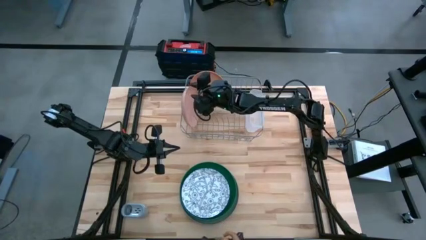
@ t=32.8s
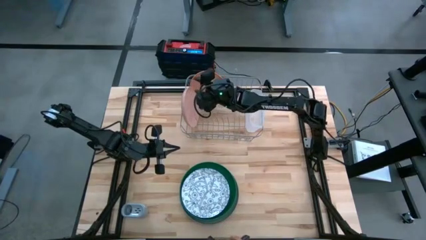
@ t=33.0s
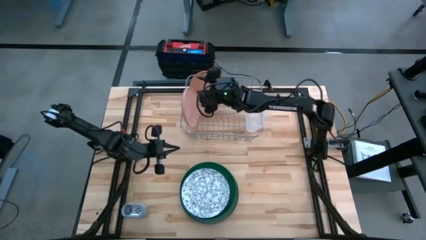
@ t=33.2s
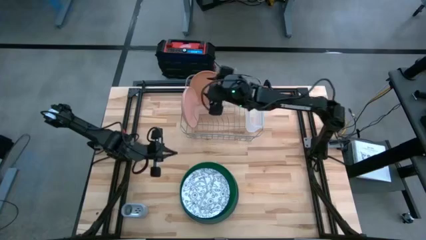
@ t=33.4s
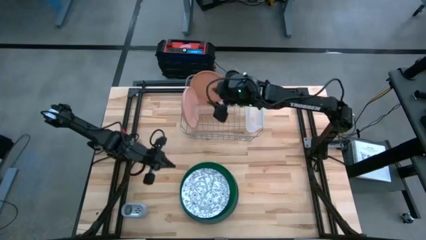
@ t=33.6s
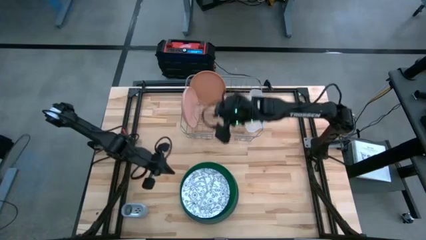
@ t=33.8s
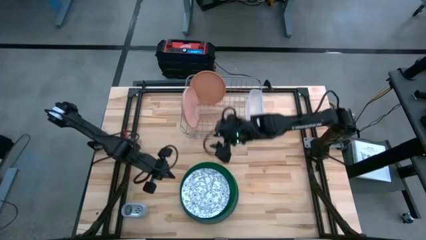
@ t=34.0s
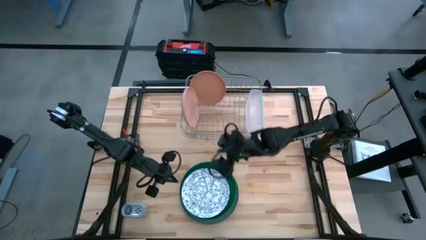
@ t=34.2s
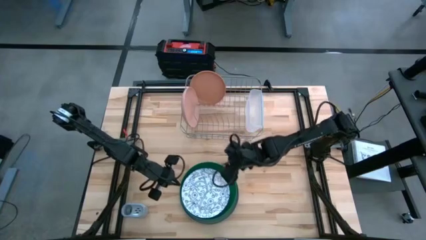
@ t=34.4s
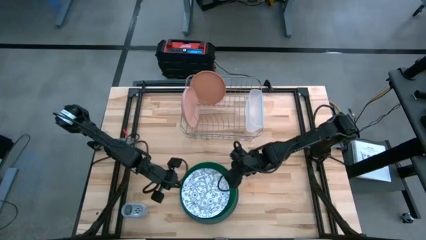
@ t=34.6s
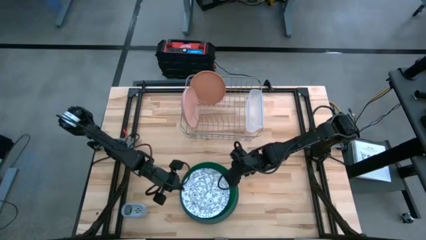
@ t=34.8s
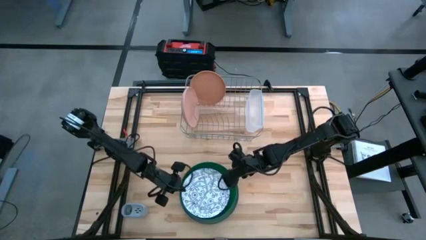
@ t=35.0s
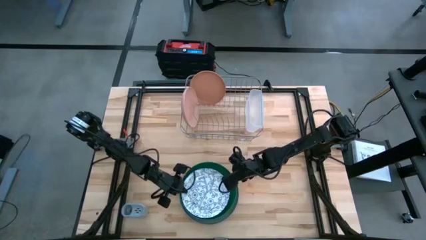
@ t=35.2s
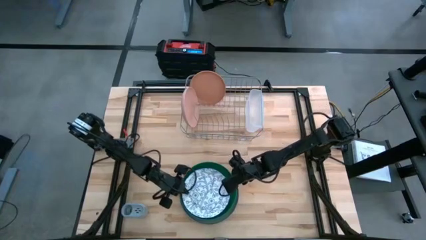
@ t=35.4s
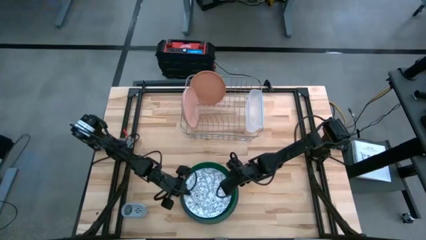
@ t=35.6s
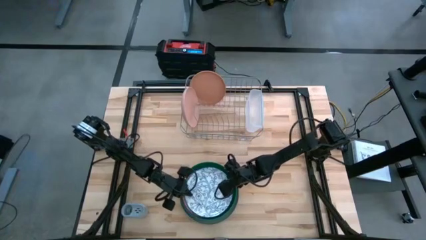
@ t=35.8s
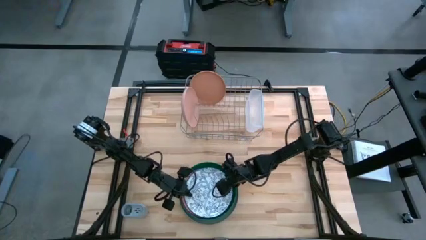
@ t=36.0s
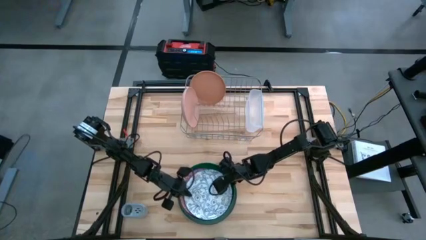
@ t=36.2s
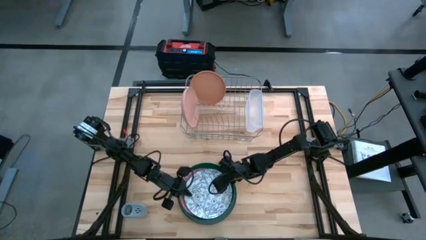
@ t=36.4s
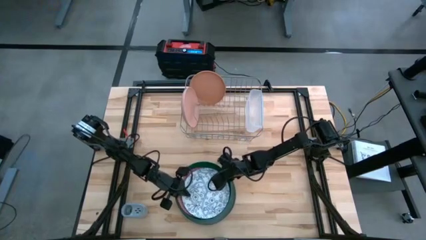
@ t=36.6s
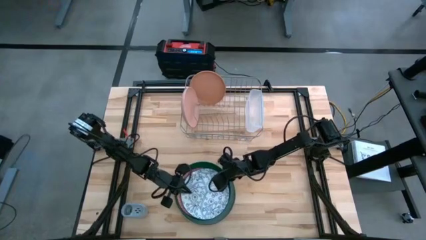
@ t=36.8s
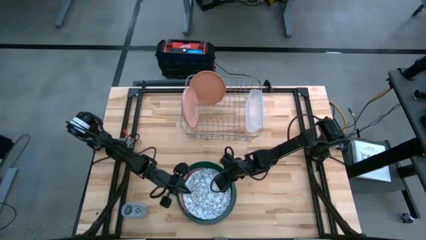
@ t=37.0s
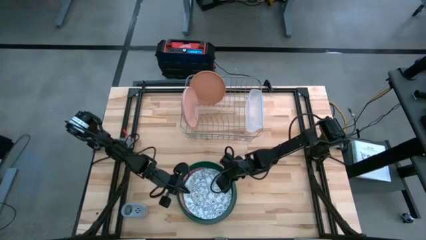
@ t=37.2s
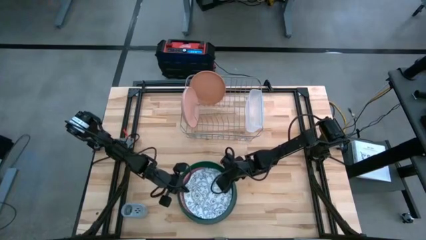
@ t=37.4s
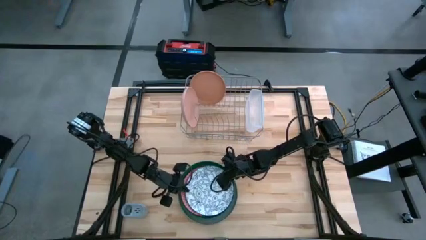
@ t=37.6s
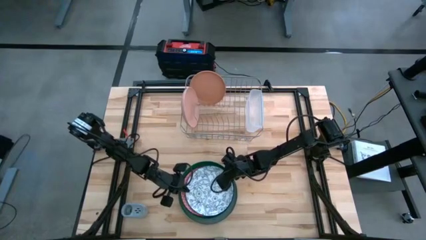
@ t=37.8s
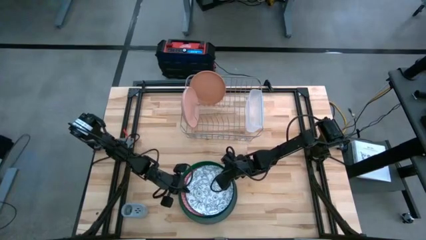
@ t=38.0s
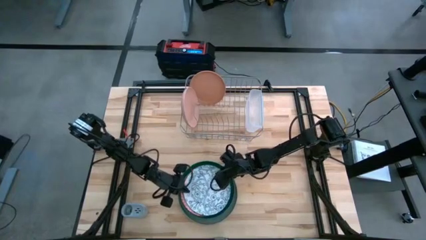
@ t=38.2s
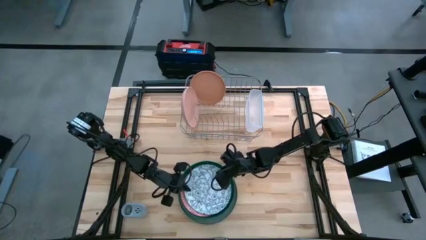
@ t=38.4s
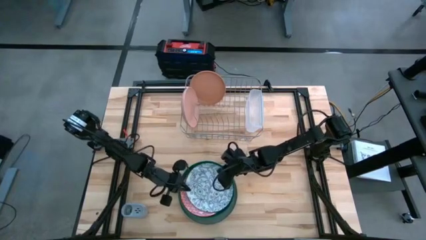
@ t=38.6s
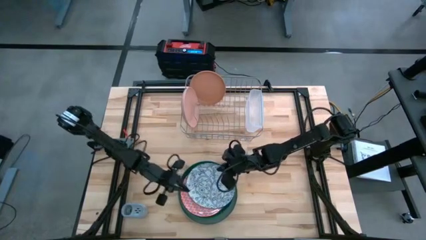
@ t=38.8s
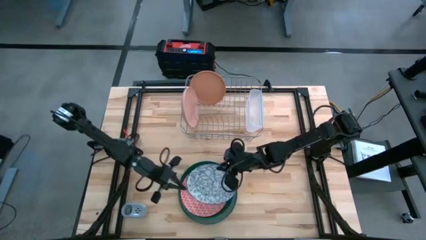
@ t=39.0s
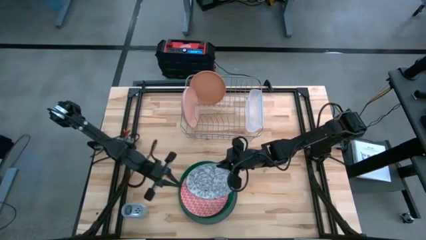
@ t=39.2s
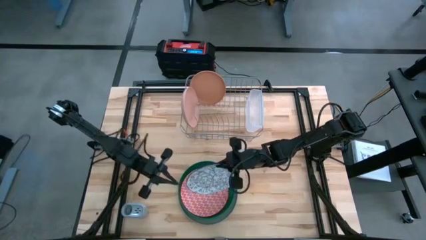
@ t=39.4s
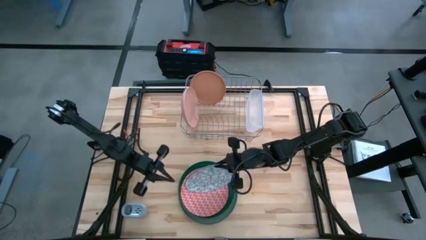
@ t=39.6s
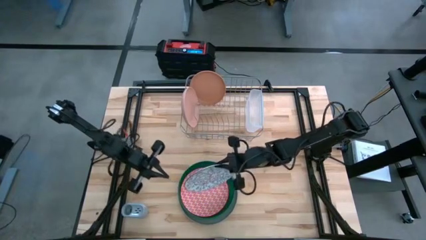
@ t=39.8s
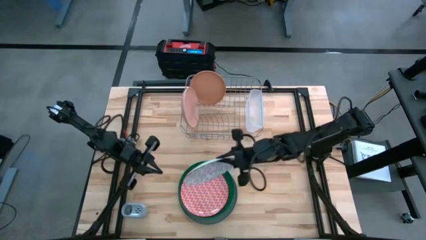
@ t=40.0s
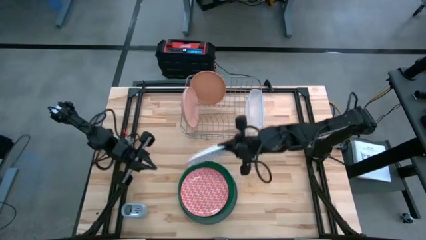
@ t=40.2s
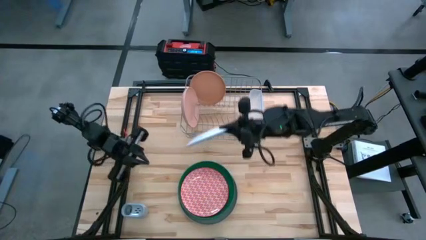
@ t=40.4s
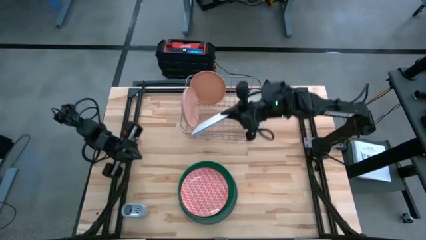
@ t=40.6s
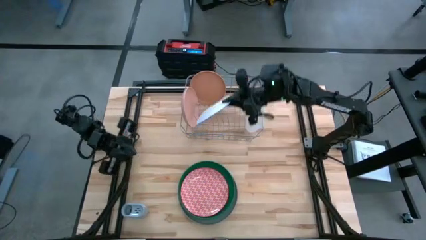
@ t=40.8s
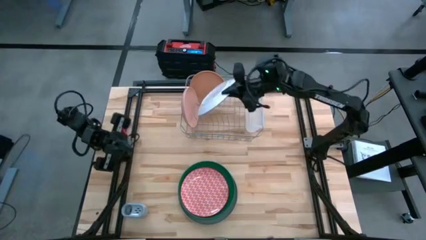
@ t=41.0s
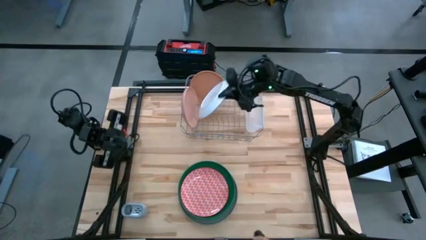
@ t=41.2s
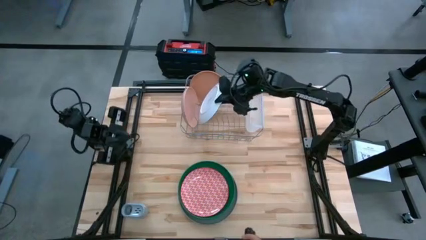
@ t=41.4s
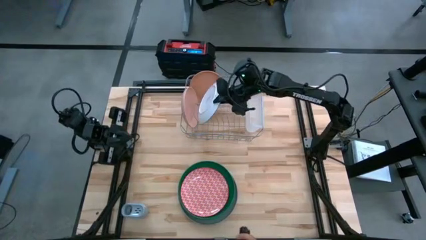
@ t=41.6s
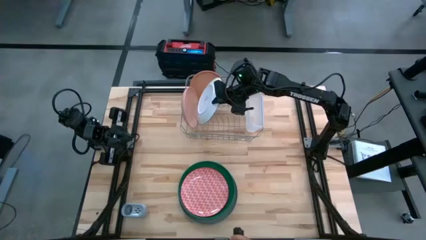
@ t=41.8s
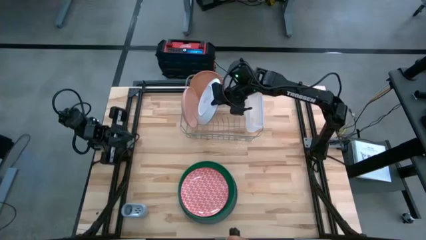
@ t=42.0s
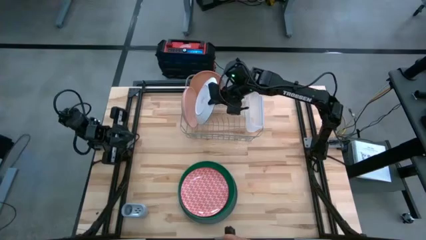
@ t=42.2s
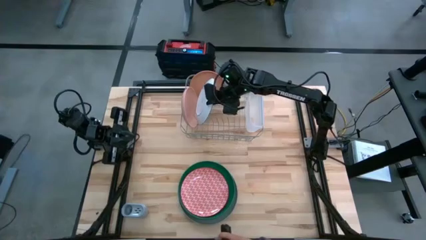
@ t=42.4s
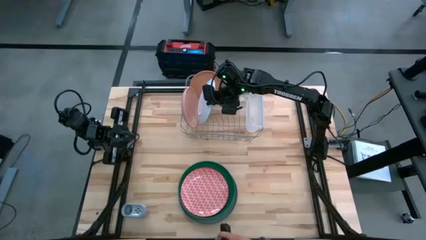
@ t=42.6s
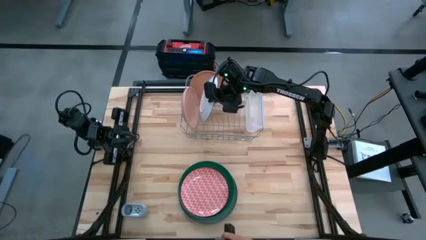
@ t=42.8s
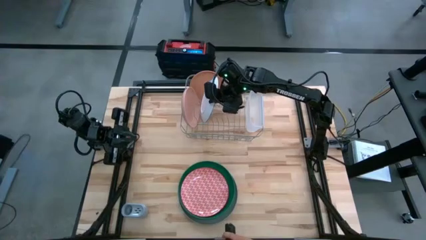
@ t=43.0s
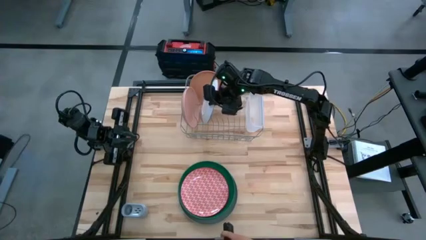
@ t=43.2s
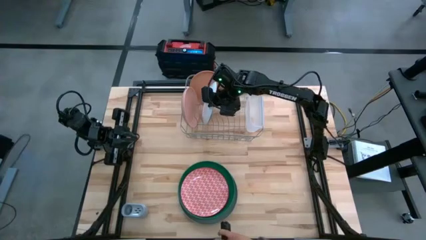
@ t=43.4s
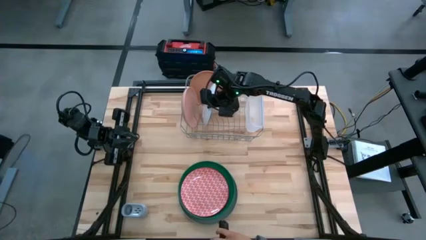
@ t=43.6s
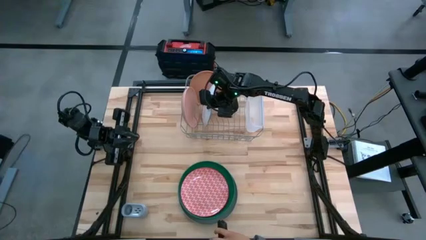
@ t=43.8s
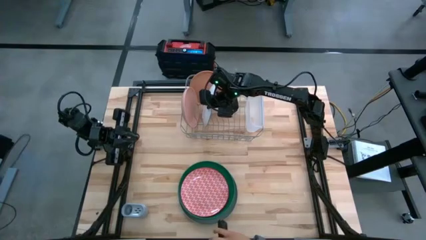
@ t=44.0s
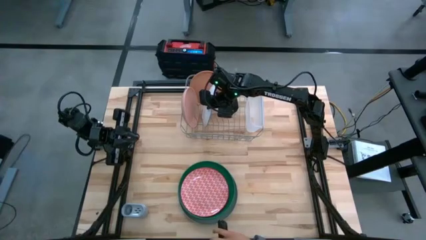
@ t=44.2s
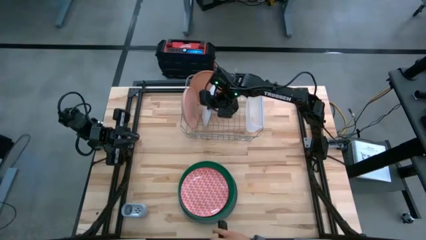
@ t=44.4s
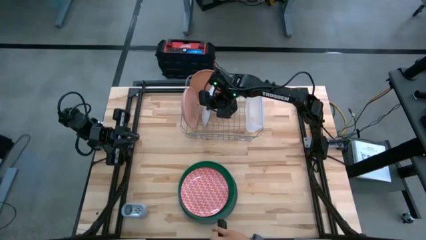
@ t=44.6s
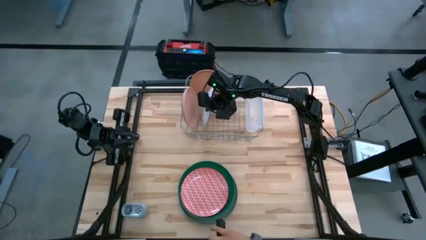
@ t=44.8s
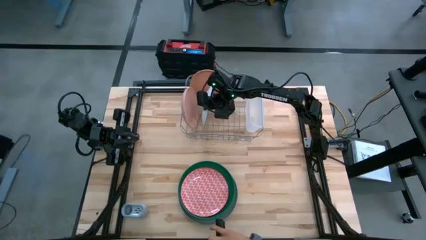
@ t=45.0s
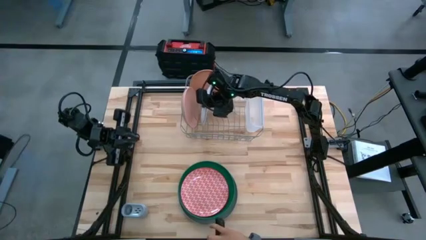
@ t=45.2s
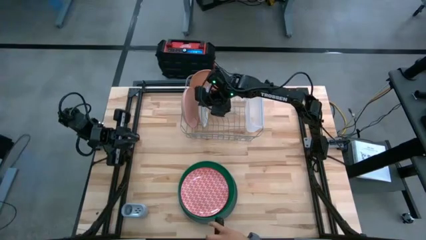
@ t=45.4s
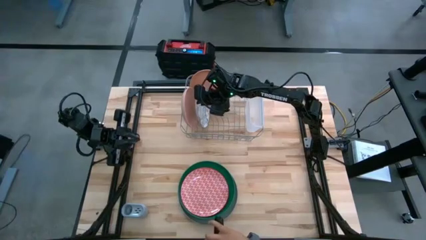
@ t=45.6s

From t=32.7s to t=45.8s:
Task: Sort dishes
Put the blue patterned plate in the dish rack

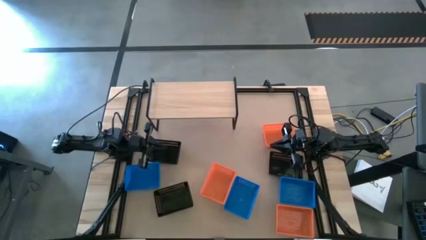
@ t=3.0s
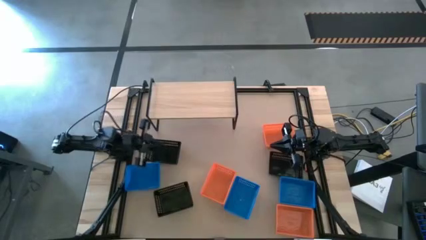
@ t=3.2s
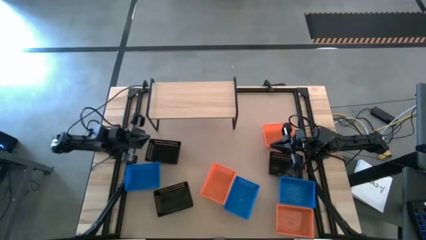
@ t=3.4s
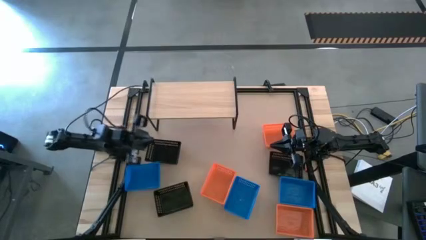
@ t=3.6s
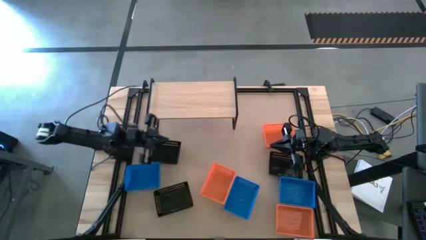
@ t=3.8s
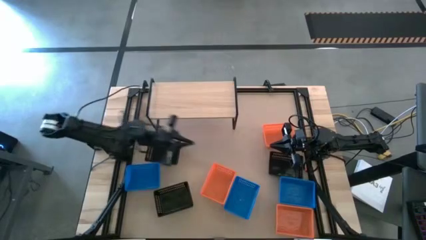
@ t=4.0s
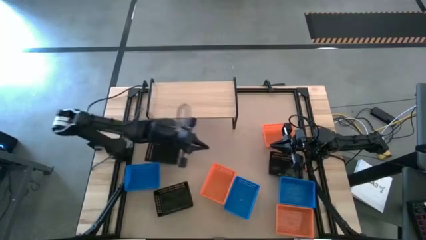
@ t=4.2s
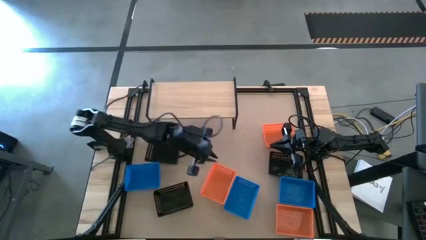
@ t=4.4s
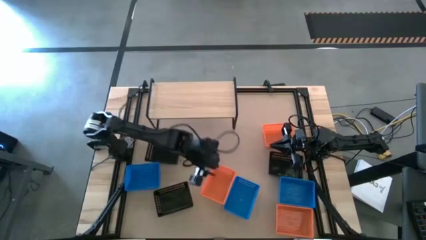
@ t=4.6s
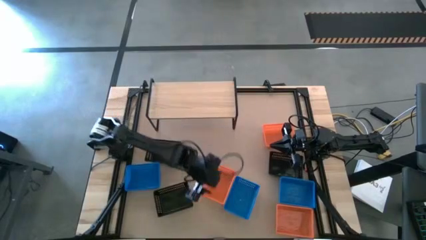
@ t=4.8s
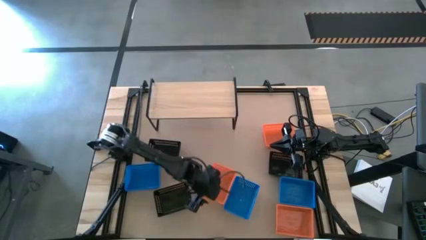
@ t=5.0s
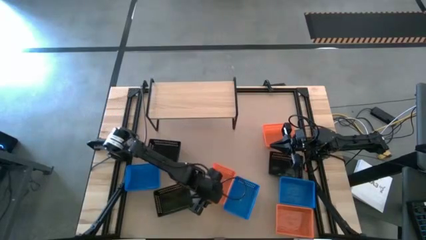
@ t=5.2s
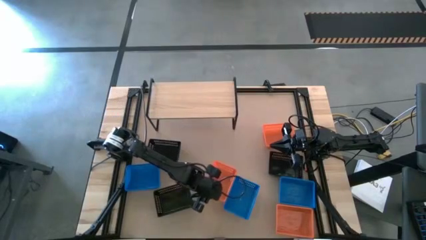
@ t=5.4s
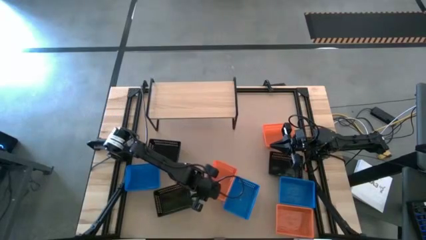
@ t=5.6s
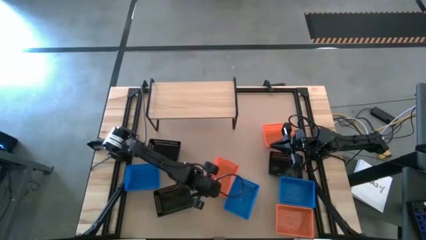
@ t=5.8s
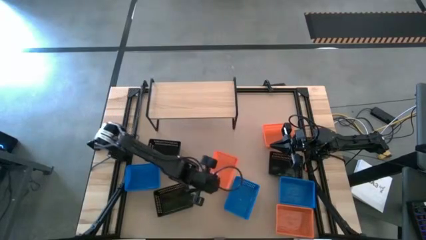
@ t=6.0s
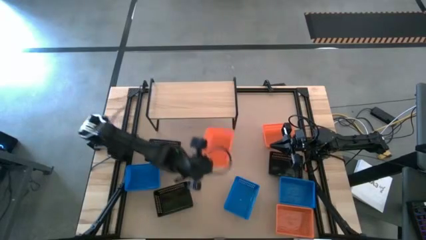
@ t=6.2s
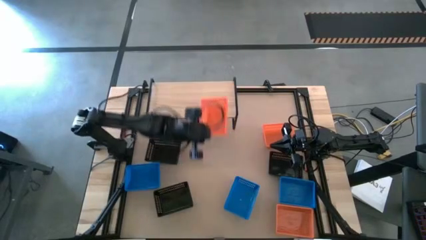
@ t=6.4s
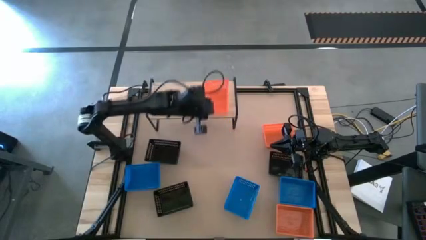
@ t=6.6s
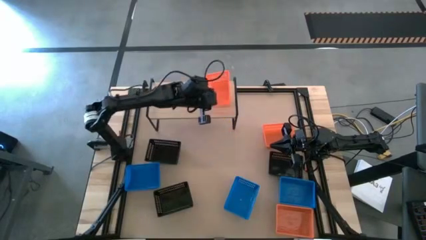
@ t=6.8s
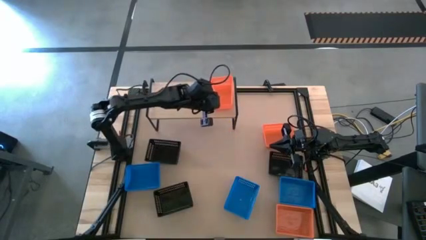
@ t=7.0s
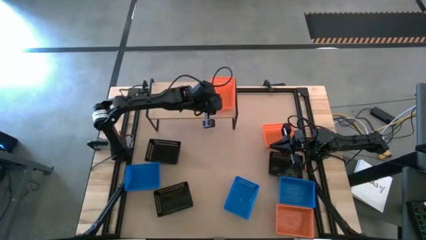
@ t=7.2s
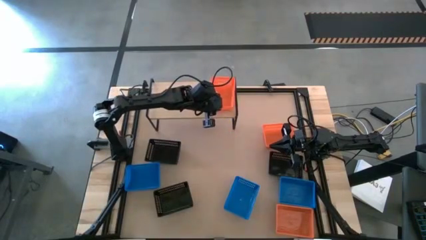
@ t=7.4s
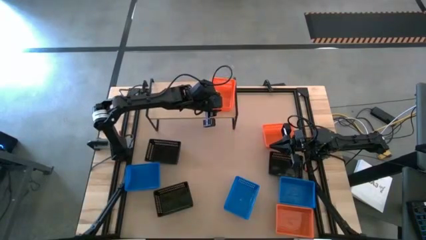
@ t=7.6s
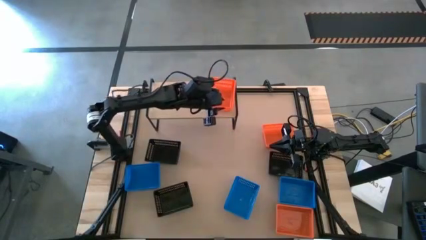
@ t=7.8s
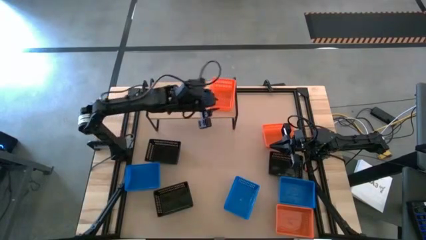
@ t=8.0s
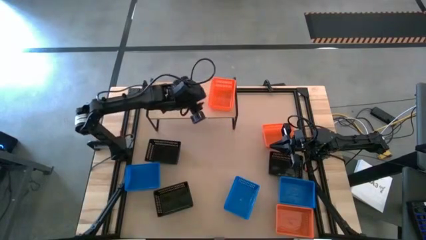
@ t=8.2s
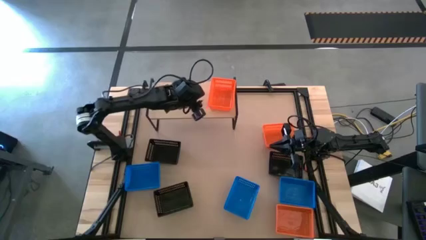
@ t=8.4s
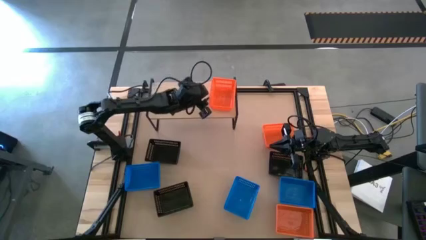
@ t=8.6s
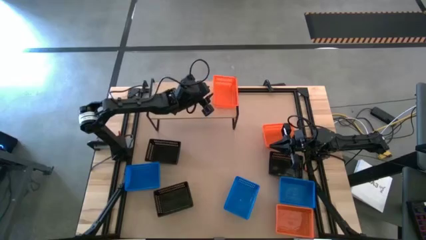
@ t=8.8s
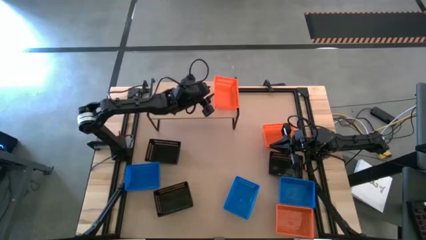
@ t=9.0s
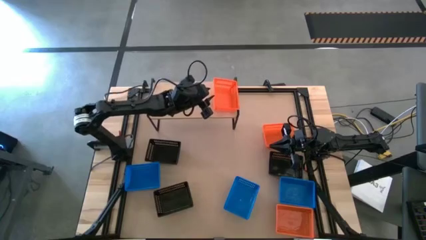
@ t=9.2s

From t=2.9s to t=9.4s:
Task: Stack baskets on shelf by color
Put the middle orange basket on the shelf
